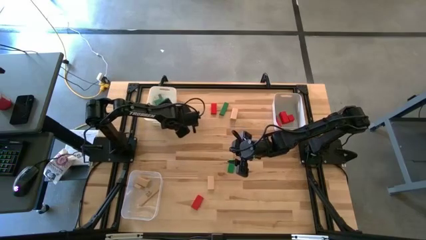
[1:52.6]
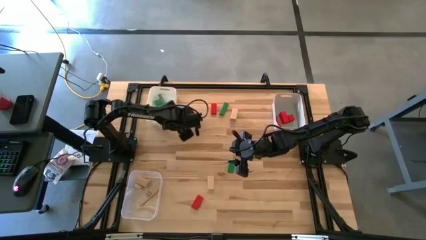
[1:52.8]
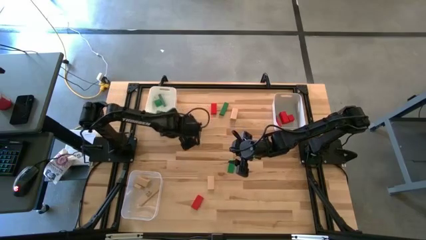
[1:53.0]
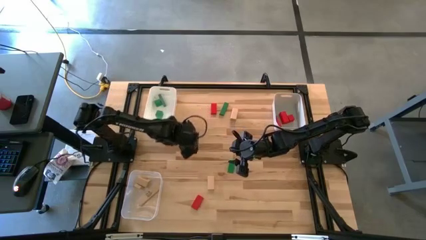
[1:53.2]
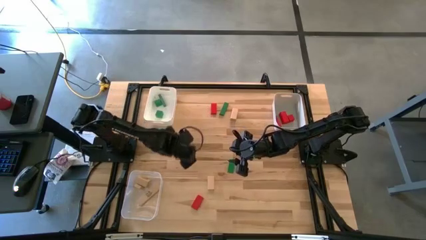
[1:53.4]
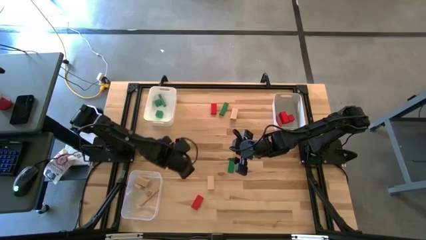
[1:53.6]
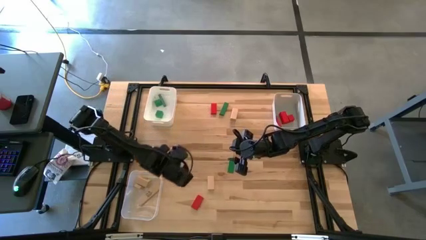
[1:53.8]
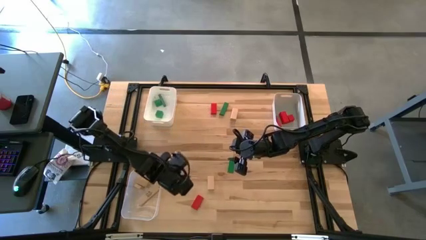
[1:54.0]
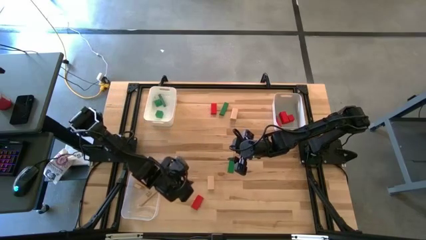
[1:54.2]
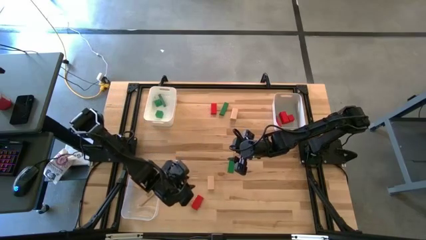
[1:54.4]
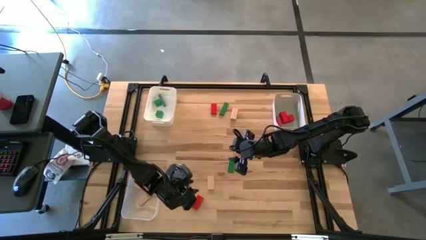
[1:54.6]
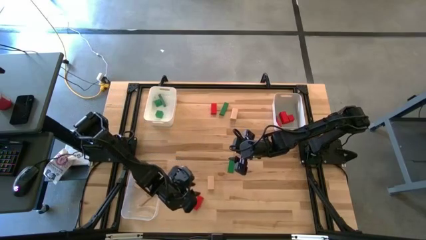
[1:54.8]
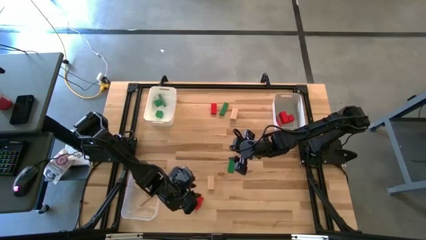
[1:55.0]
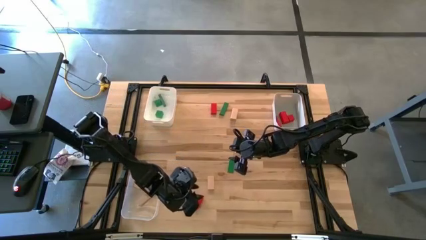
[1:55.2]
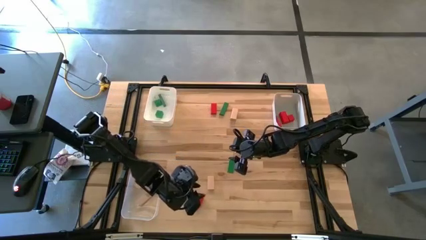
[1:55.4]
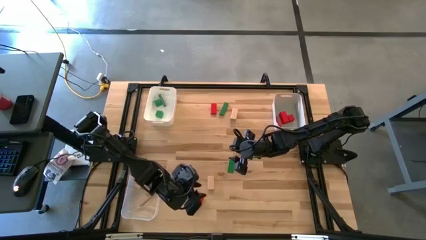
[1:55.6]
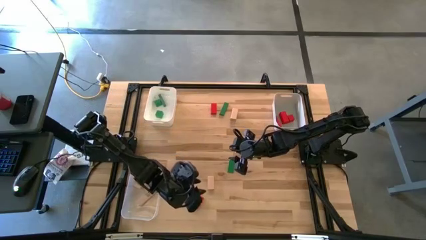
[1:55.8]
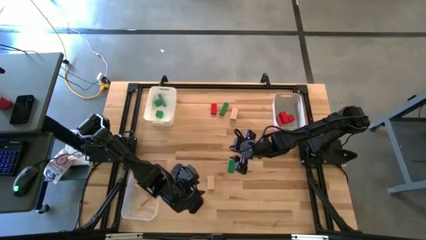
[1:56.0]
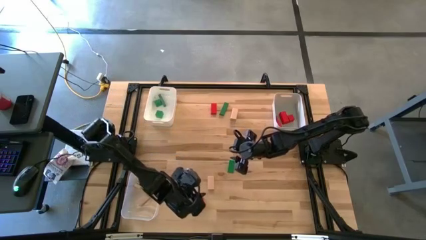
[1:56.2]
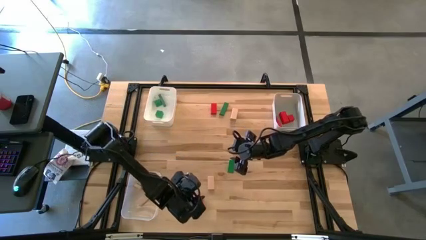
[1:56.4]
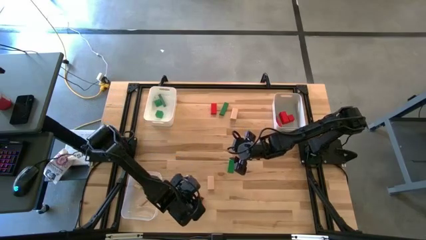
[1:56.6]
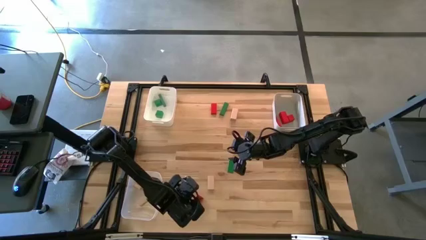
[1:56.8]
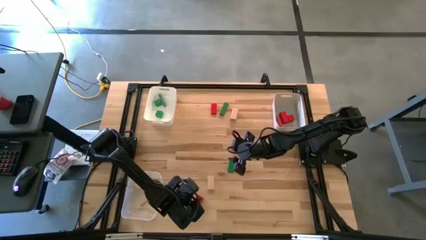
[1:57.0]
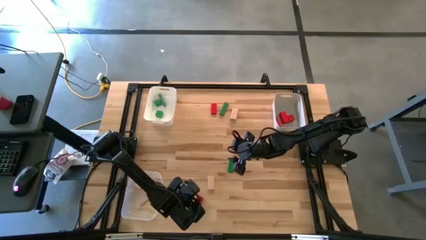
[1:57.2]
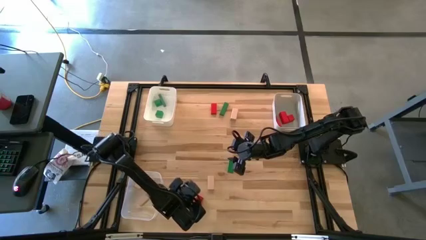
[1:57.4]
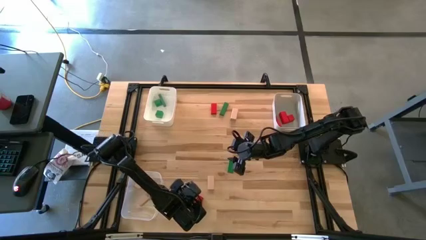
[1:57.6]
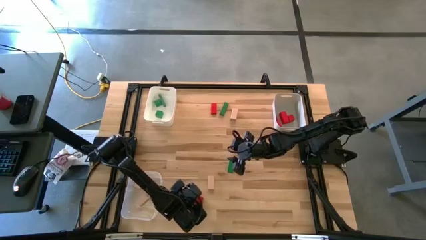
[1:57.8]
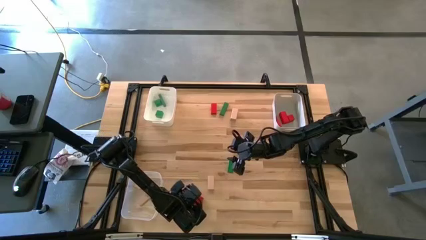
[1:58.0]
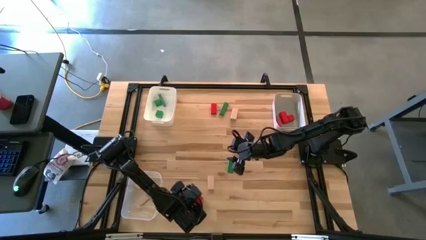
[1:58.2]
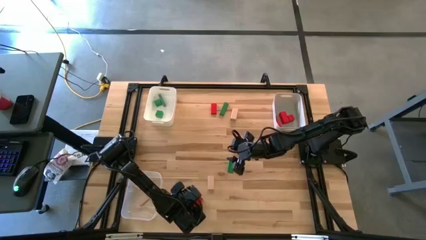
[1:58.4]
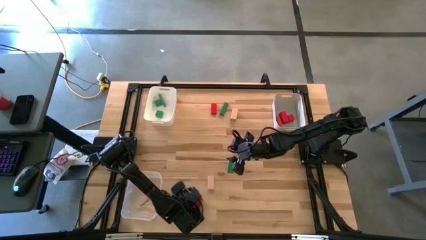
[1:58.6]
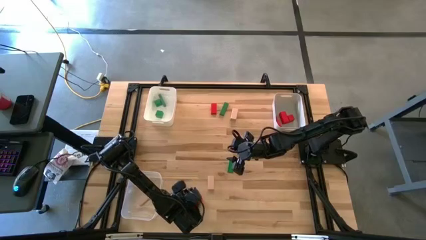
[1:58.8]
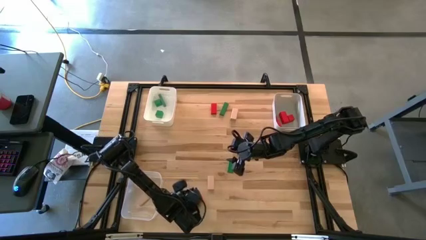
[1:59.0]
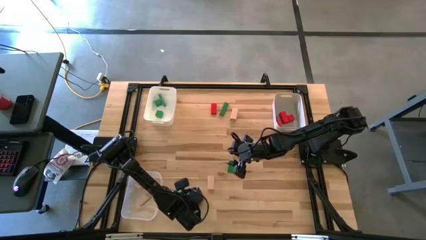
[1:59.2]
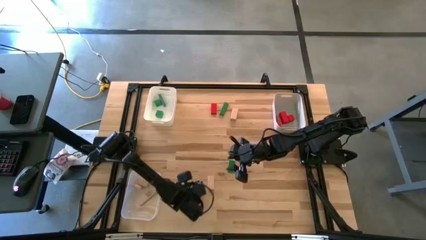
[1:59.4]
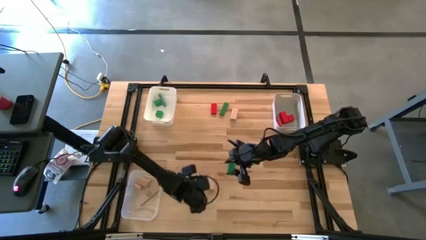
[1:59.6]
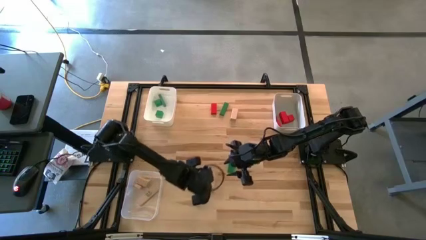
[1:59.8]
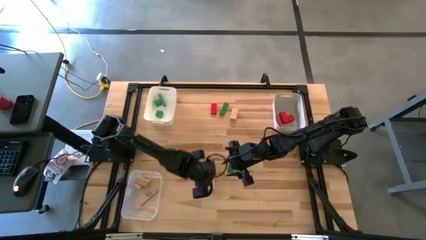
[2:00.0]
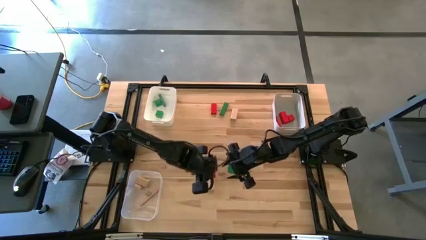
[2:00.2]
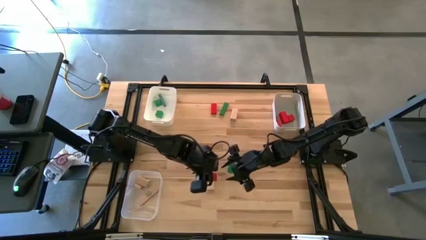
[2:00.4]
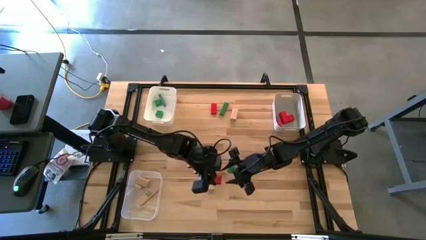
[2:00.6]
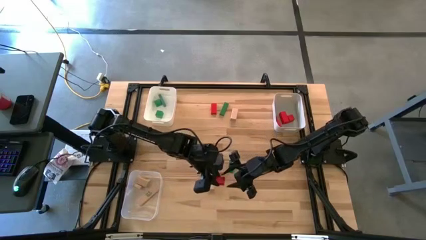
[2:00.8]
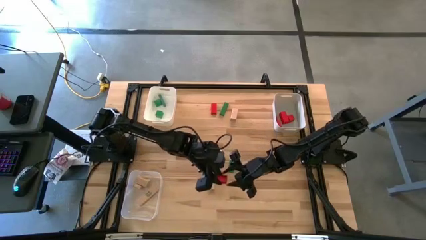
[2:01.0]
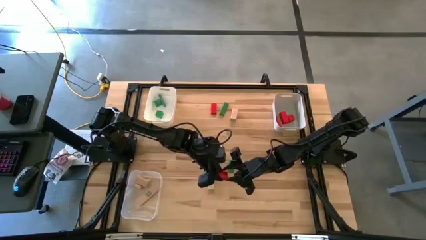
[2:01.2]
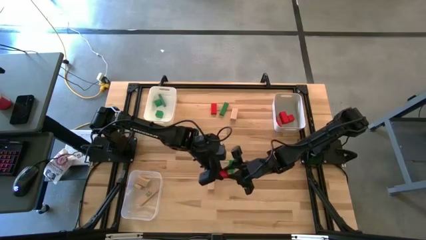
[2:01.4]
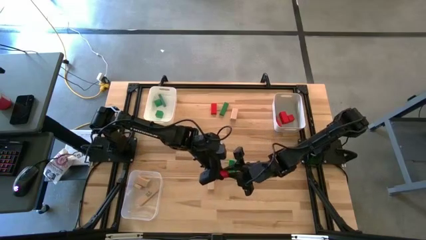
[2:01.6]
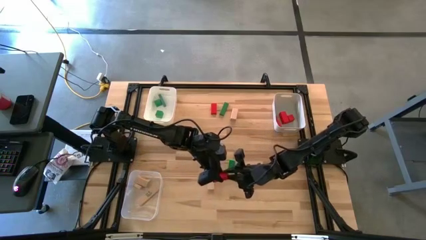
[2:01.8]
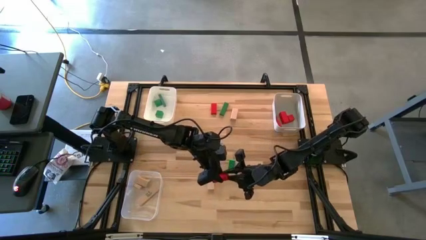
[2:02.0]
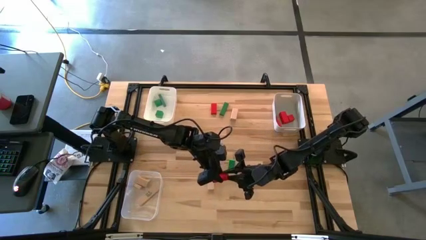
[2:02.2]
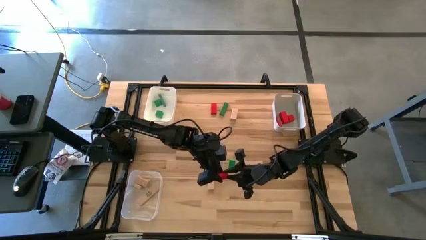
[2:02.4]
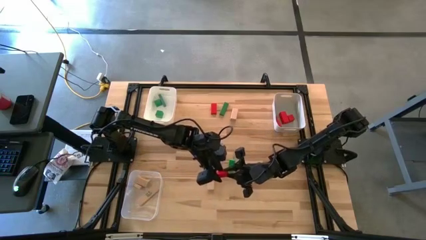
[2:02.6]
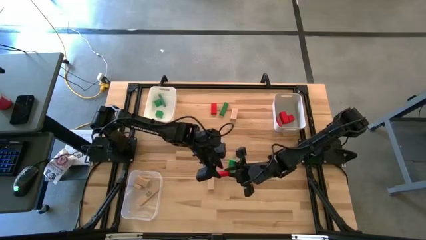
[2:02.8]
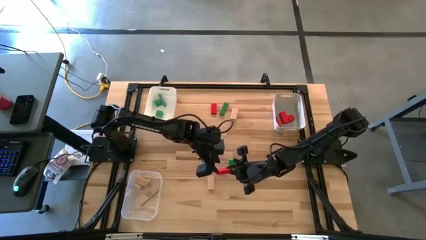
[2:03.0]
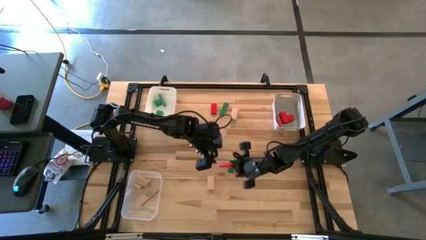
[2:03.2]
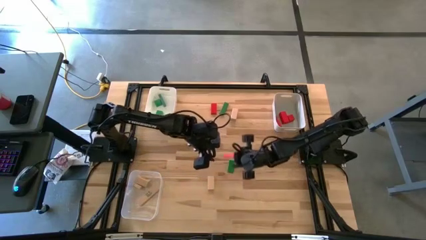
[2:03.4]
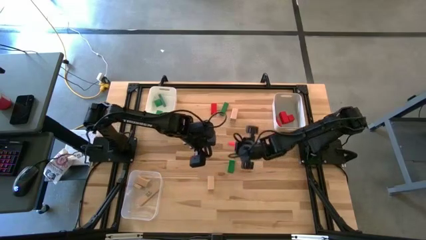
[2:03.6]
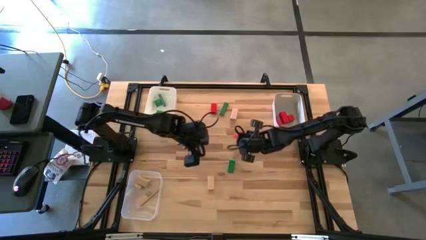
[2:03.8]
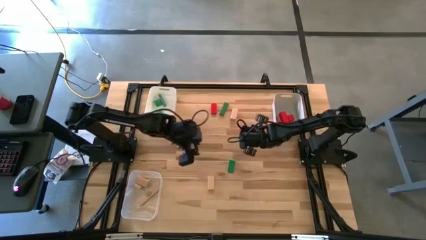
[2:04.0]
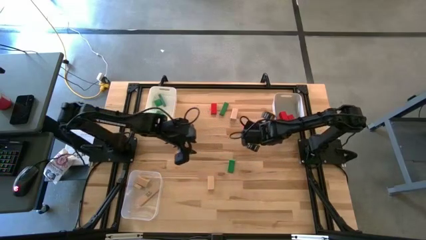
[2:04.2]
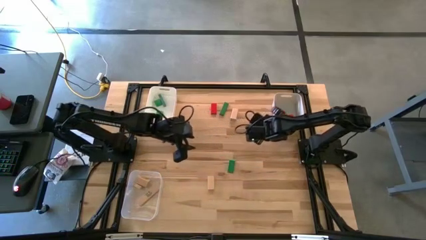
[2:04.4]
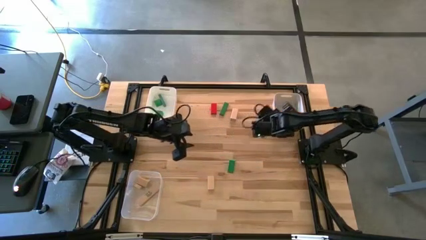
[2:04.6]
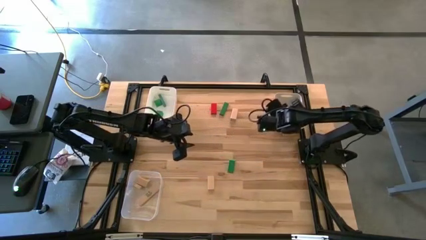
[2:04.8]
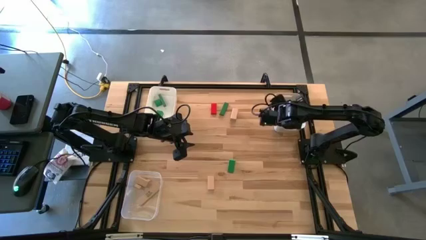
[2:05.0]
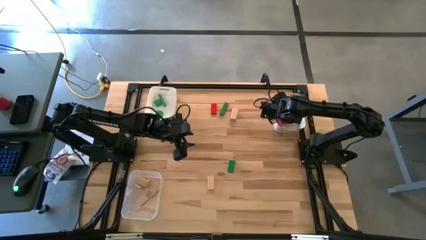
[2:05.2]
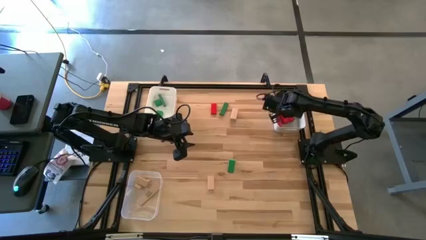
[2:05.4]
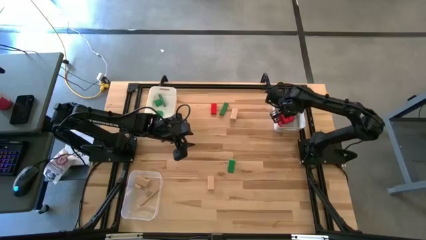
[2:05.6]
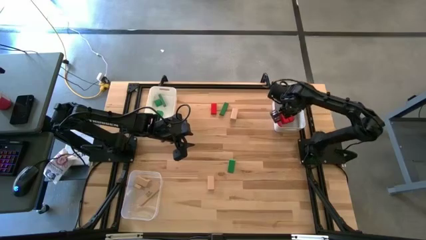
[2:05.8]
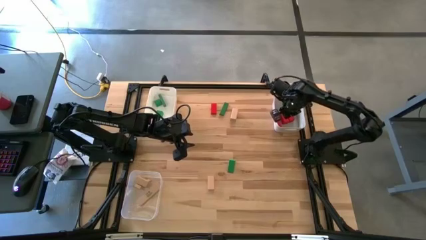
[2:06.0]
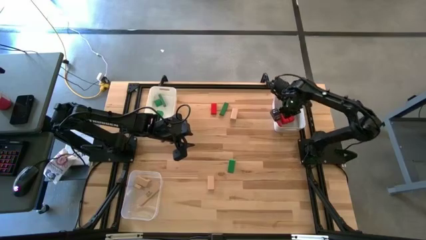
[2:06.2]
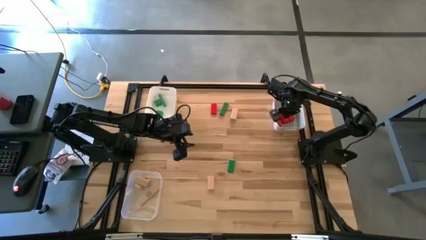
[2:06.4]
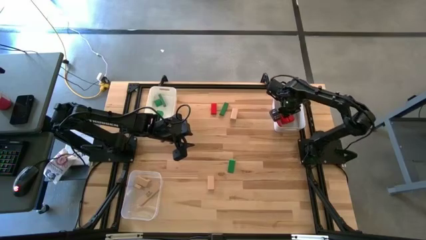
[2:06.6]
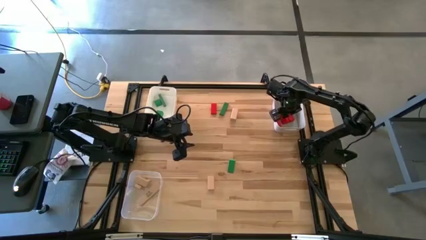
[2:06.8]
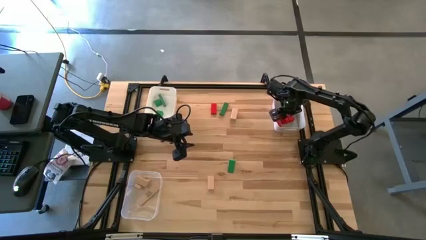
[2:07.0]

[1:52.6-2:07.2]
Task: Sort & place blocks by color
Put the red block into the gray bin
